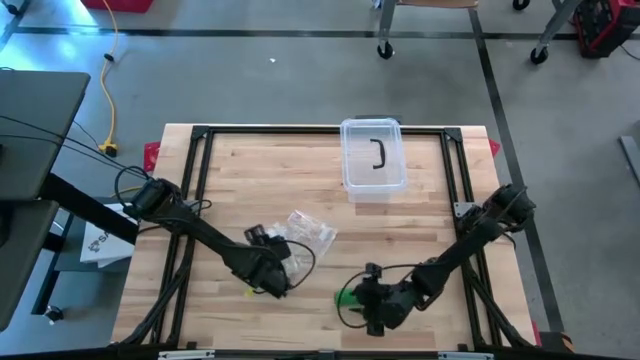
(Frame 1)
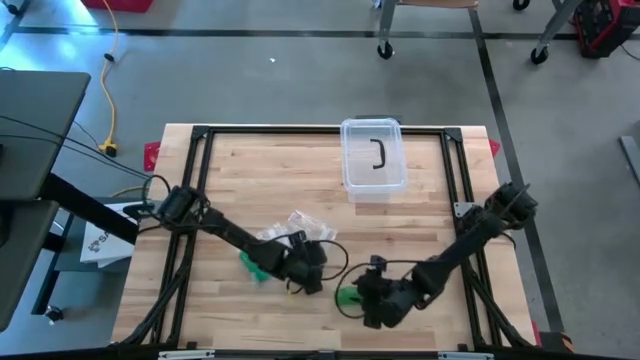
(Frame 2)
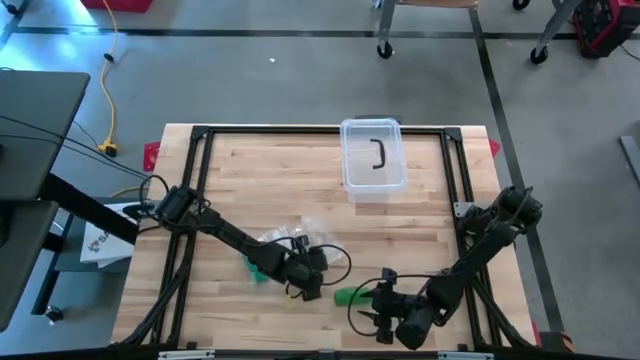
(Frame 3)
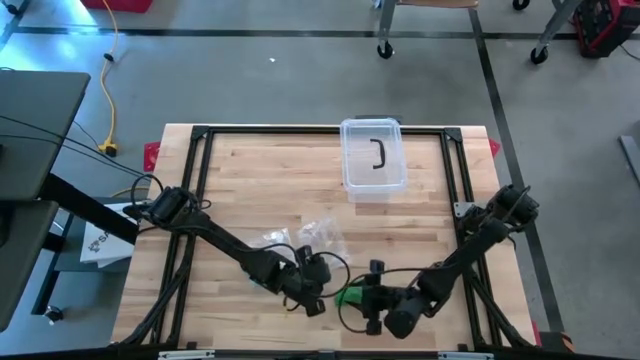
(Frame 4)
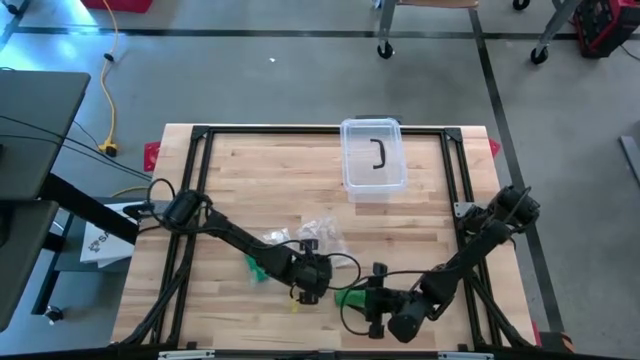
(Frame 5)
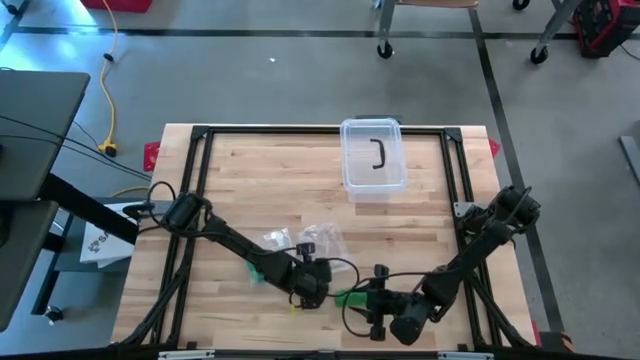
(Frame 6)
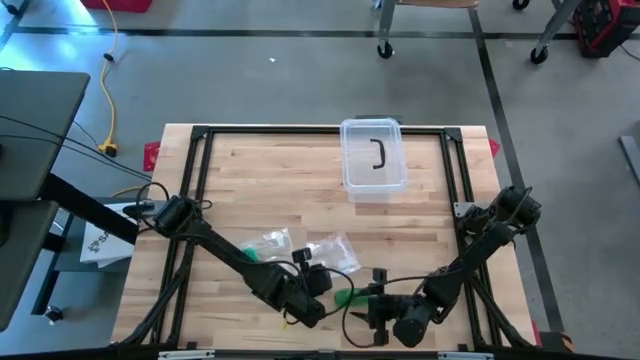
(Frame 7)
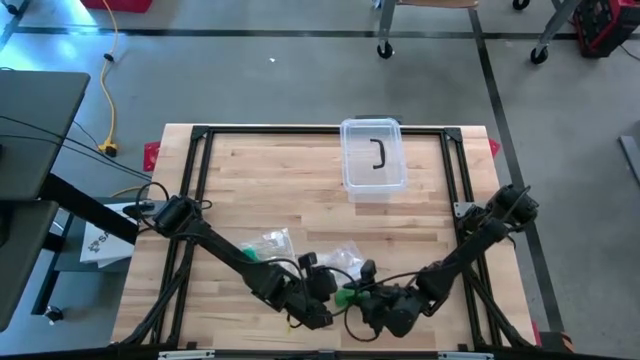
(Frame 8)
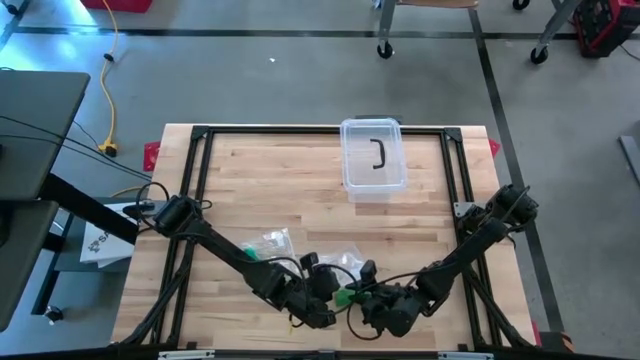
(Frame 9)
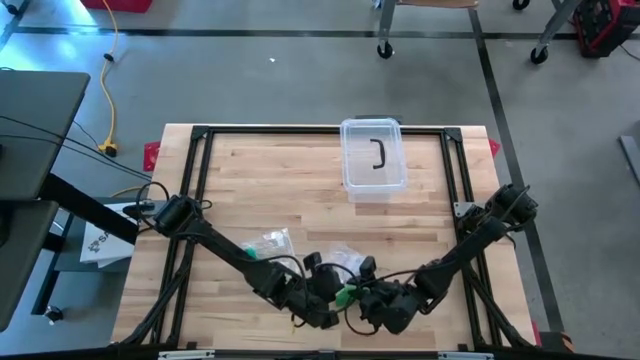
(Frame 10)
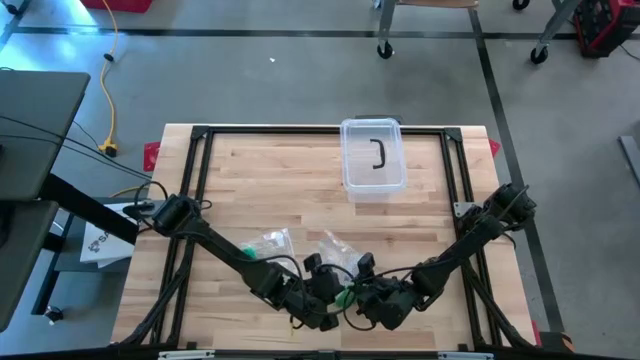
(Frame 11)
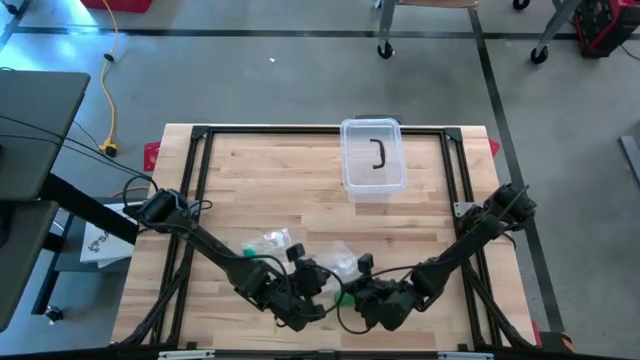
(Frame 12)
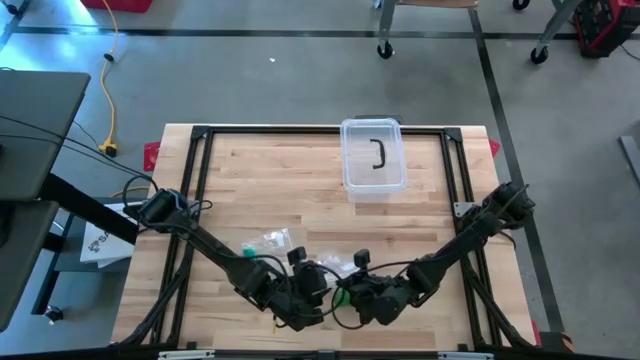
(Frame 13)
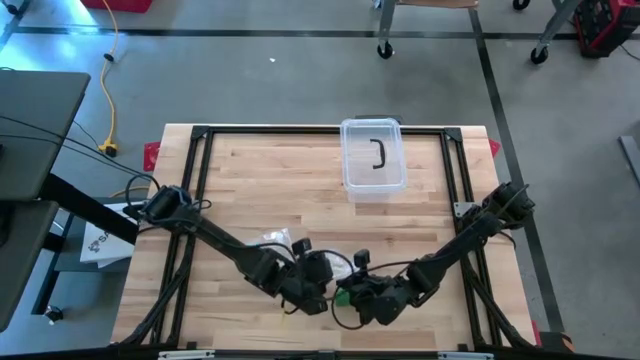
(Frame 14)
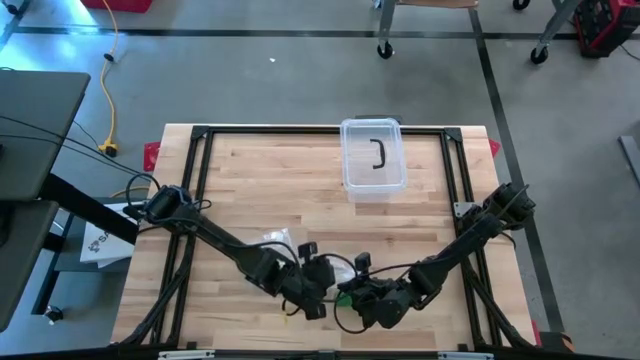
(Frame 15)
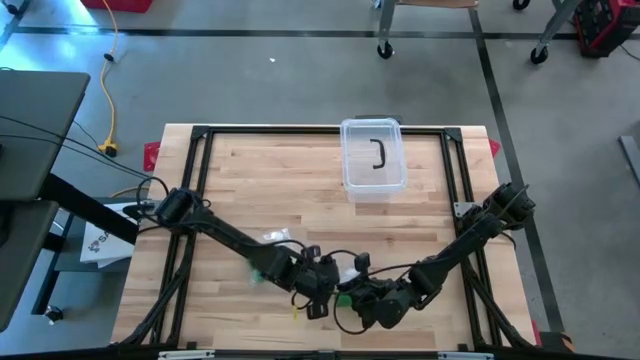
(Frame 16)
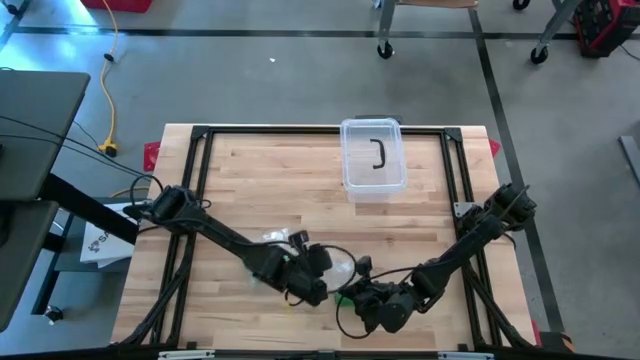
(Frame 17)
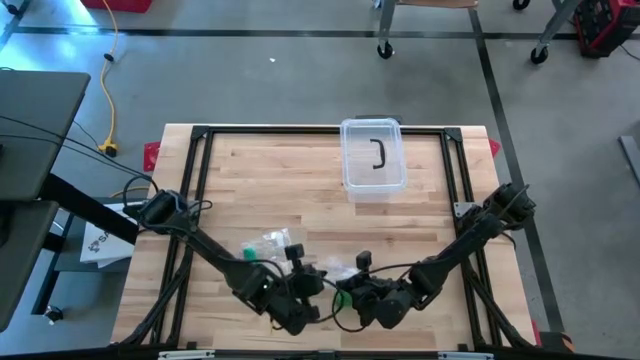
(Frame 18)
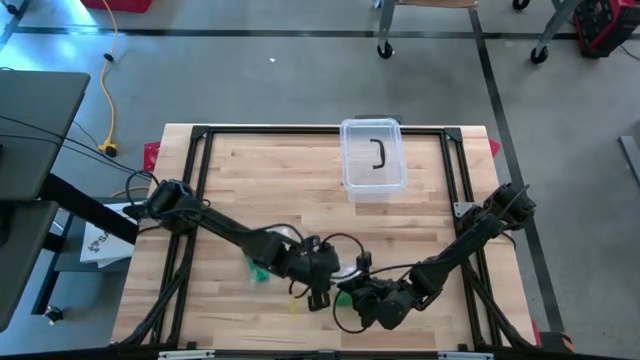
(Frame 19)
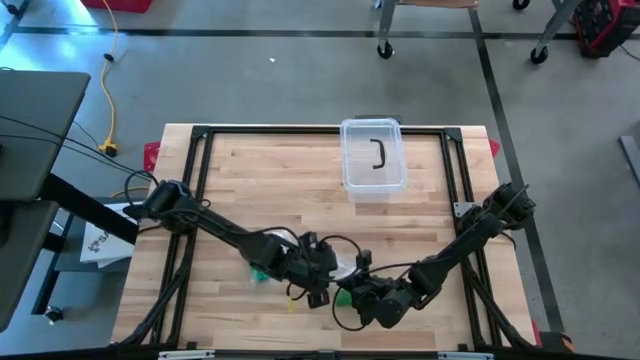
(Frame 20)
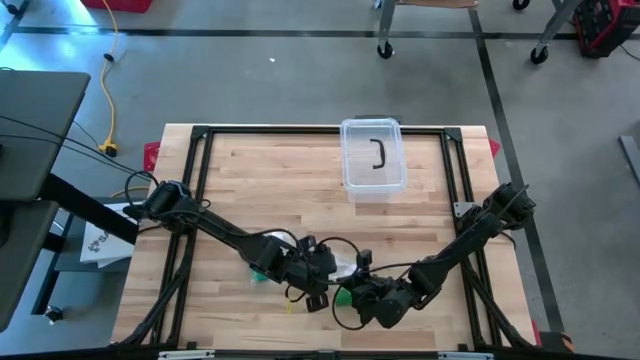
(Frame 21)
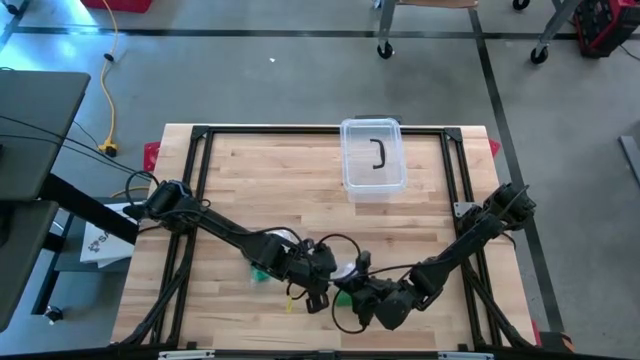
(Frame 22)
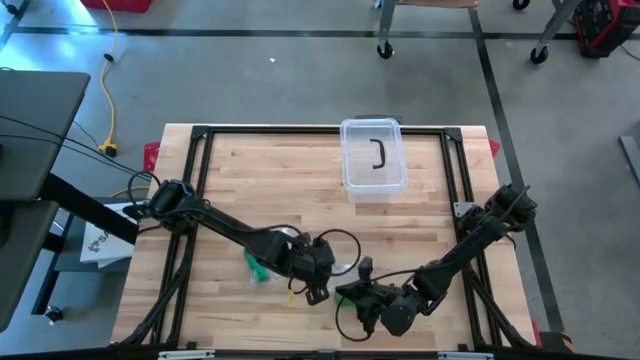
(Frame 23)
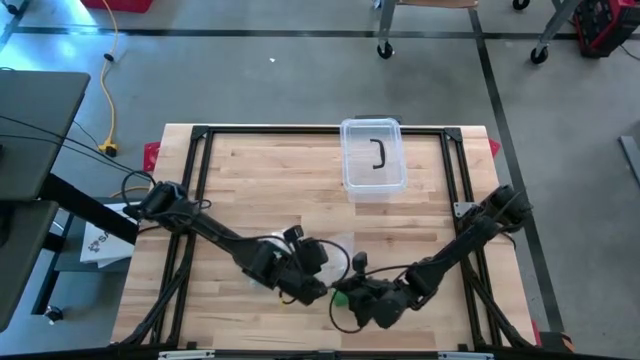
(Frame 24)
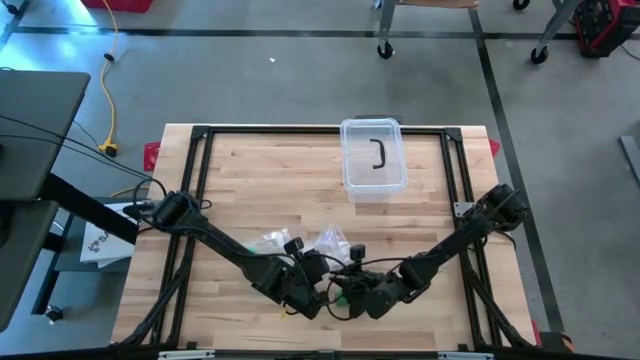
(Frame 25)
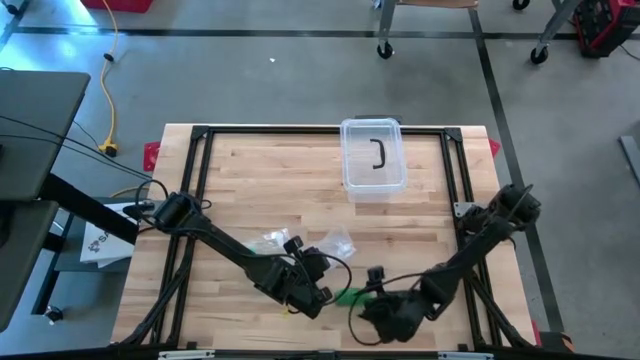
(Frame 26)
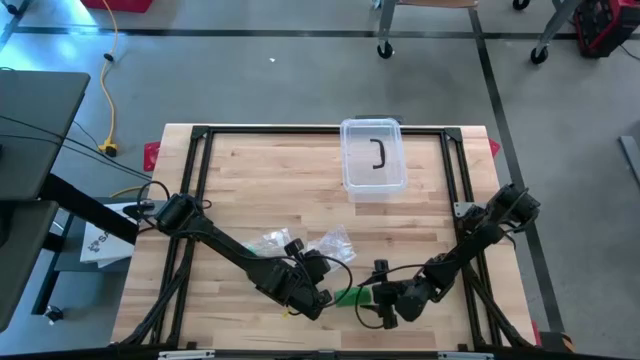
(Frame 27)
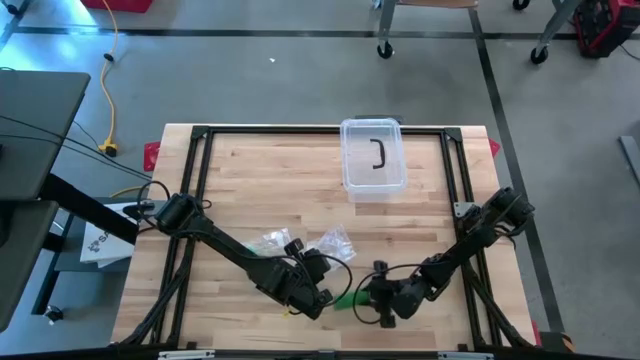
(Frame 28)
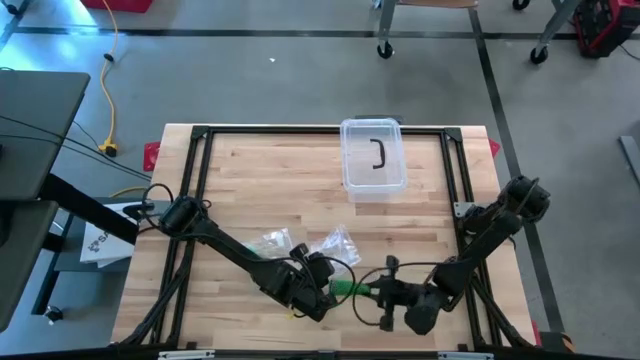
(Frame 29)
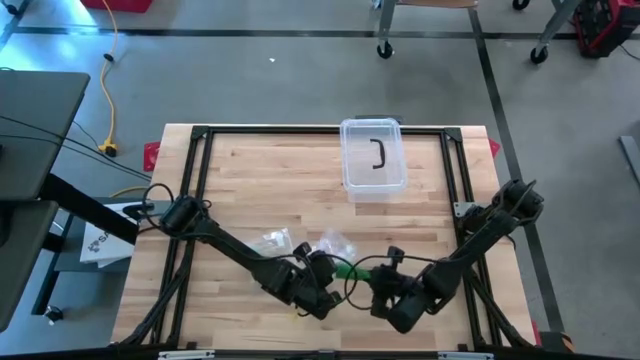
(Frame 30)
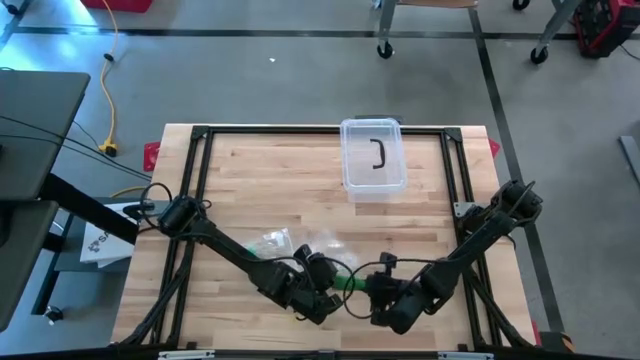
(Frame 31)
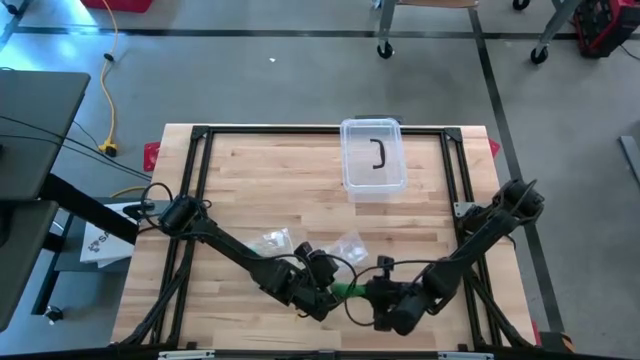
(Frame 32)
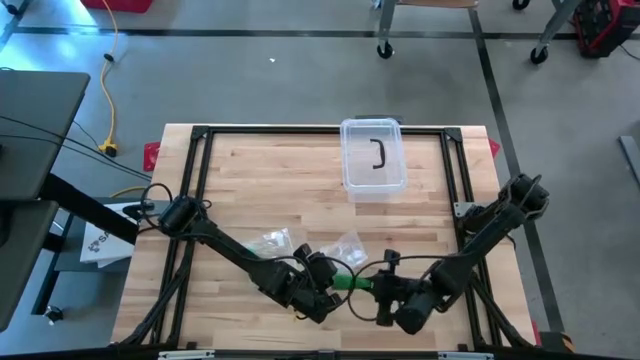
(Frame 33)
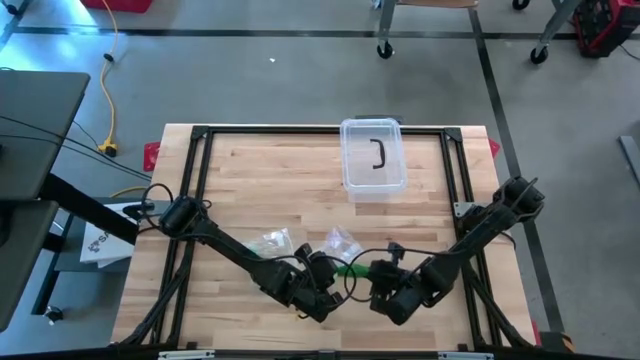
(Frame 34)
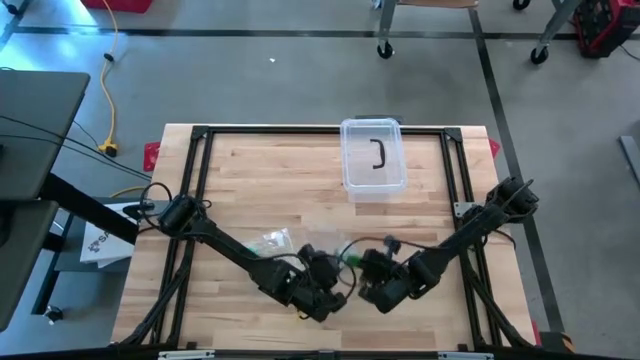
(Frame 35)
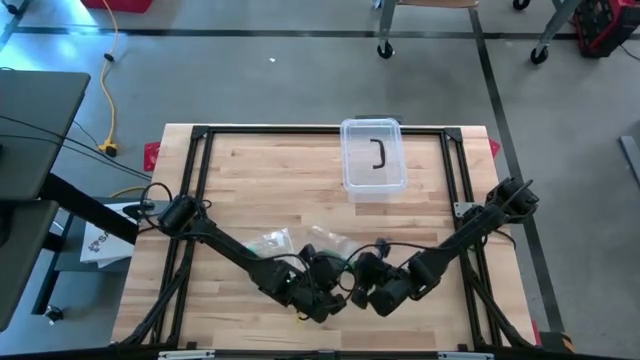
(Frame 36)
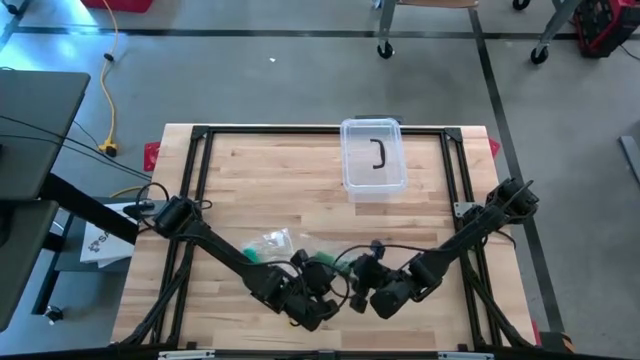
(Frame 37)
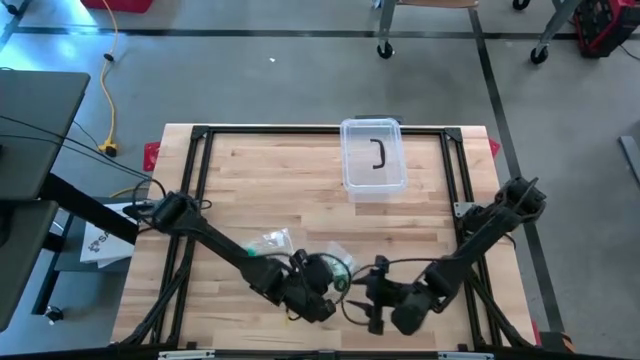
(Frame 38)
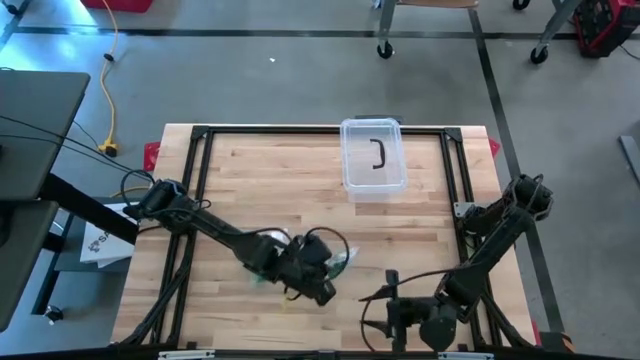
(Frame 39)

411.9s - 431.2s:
Task: Roll bandage
Put the green bandage into the transparent zip bag
